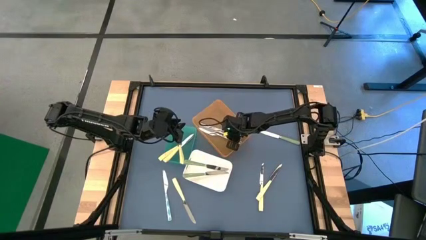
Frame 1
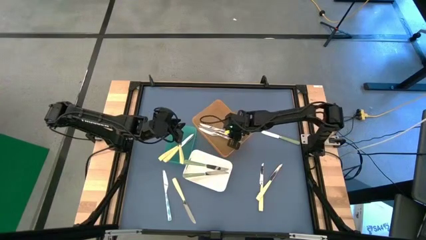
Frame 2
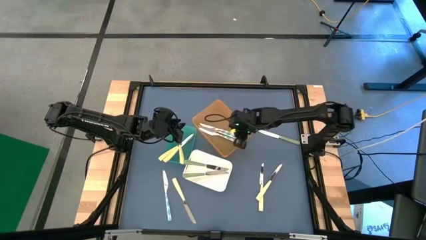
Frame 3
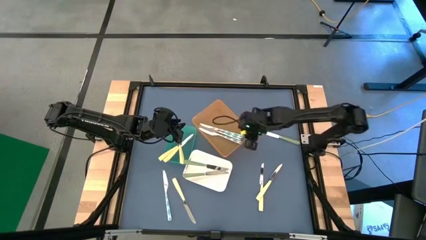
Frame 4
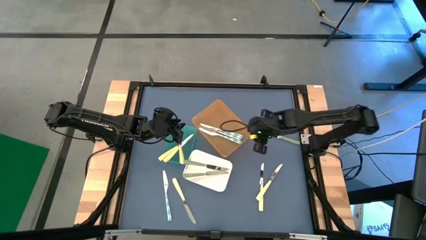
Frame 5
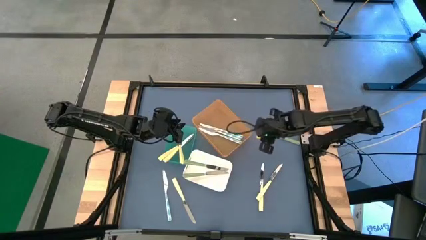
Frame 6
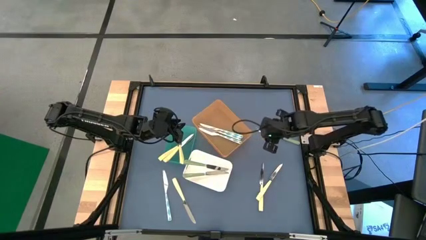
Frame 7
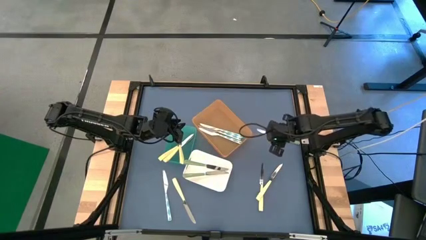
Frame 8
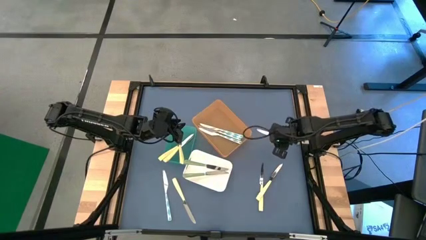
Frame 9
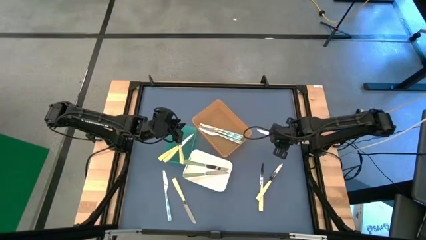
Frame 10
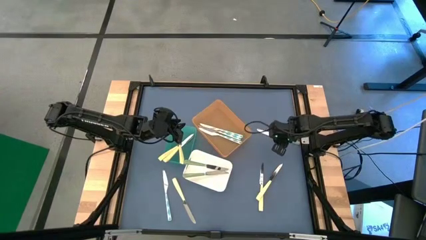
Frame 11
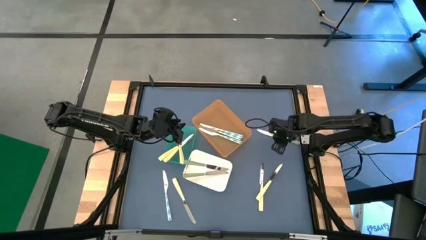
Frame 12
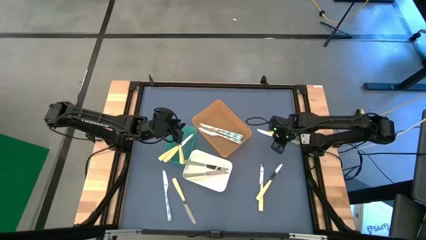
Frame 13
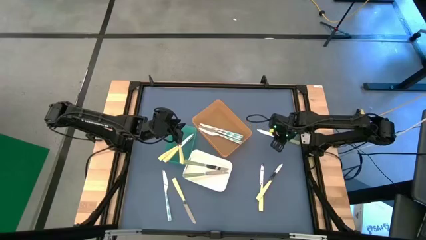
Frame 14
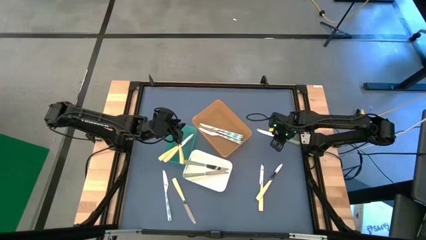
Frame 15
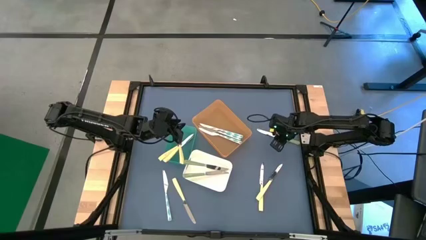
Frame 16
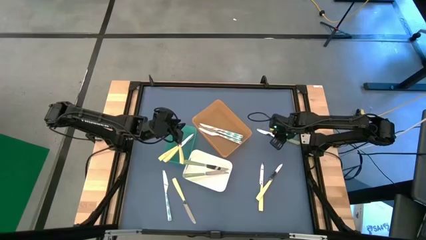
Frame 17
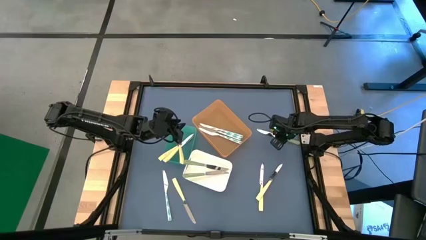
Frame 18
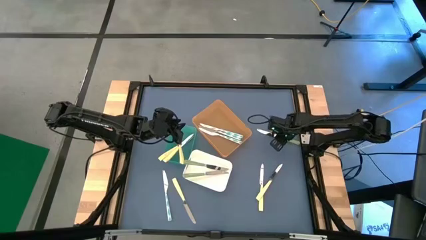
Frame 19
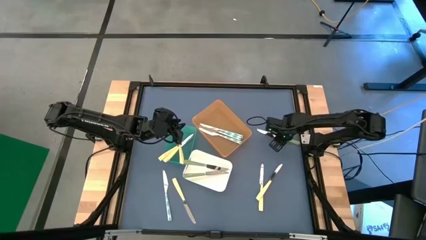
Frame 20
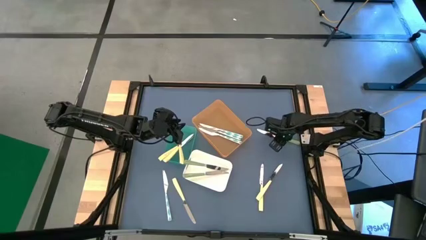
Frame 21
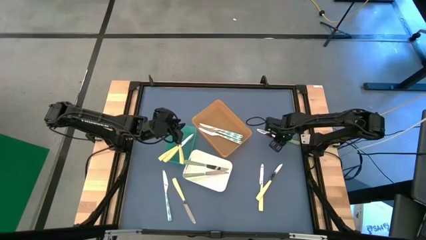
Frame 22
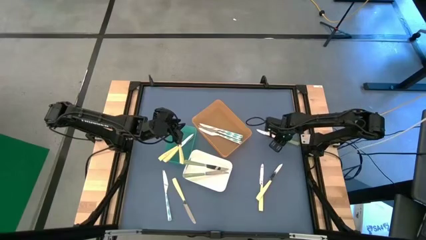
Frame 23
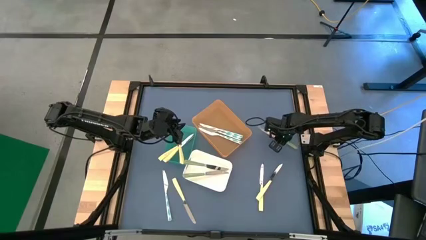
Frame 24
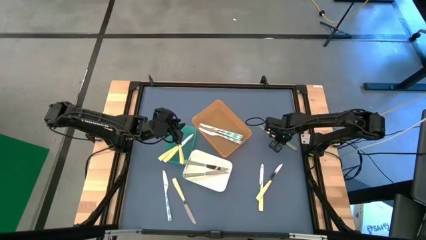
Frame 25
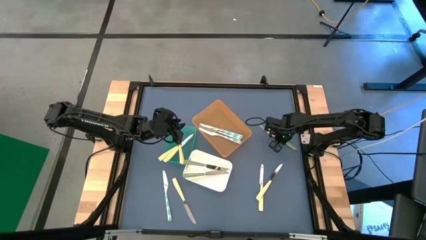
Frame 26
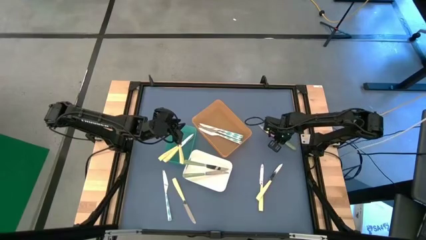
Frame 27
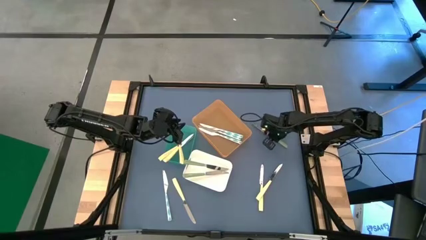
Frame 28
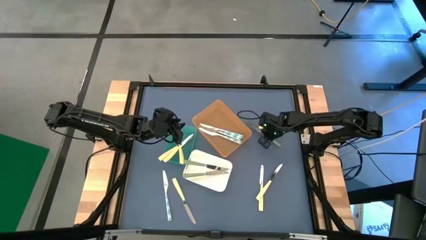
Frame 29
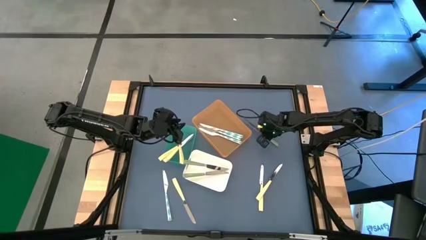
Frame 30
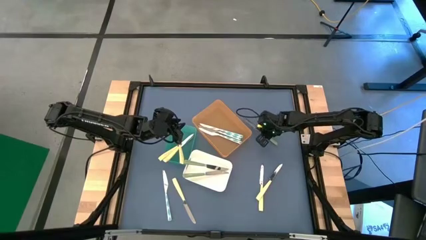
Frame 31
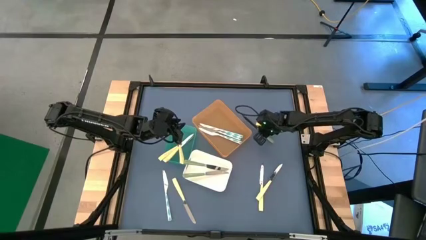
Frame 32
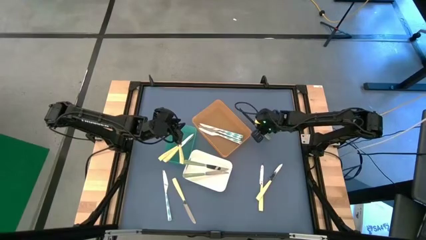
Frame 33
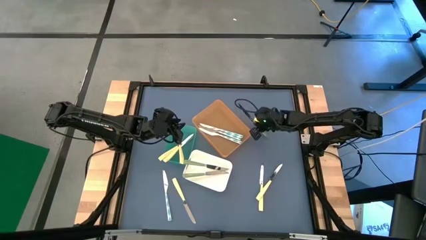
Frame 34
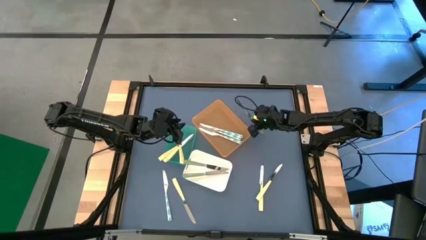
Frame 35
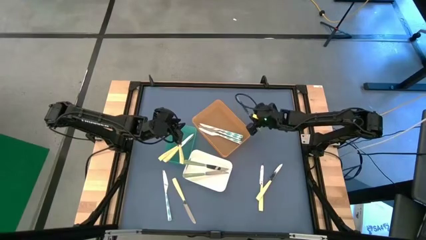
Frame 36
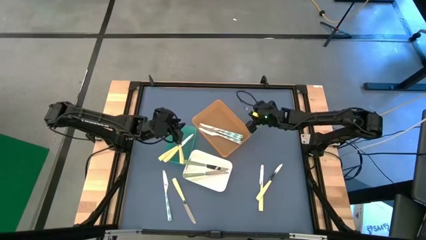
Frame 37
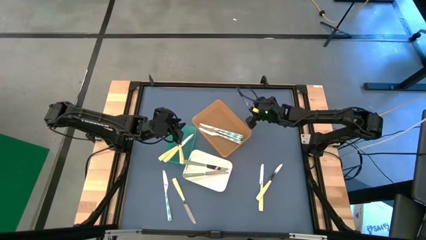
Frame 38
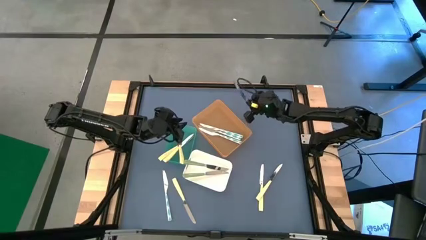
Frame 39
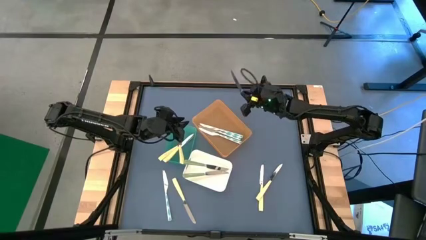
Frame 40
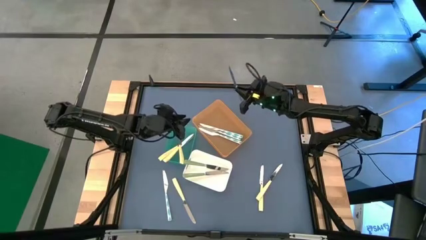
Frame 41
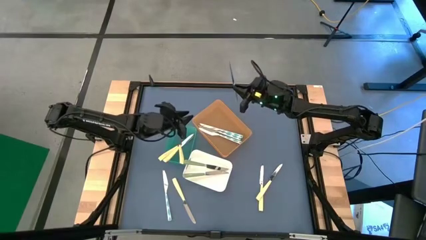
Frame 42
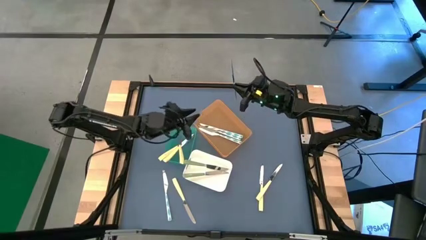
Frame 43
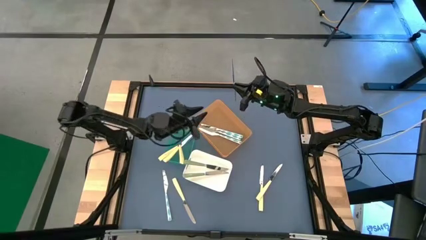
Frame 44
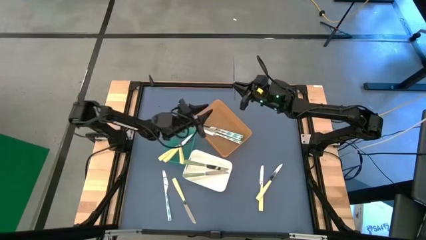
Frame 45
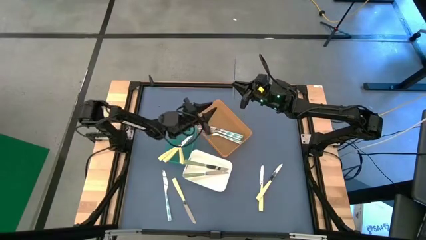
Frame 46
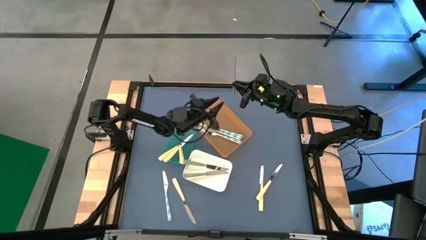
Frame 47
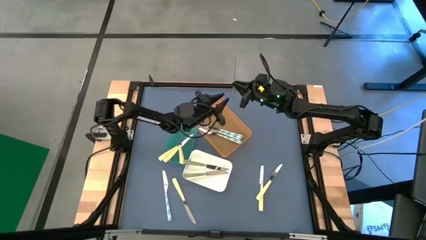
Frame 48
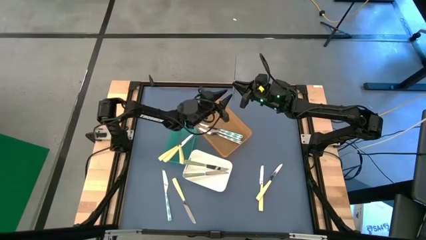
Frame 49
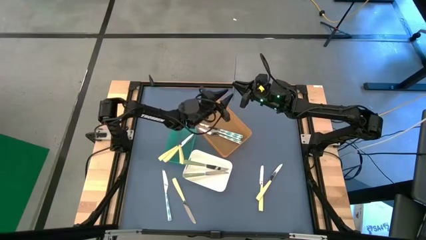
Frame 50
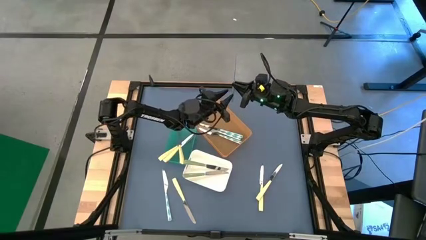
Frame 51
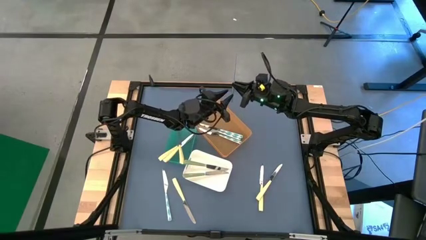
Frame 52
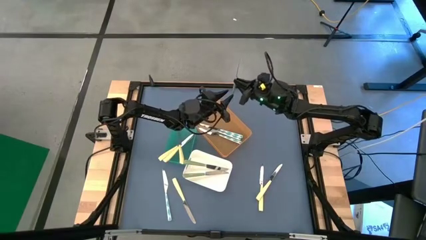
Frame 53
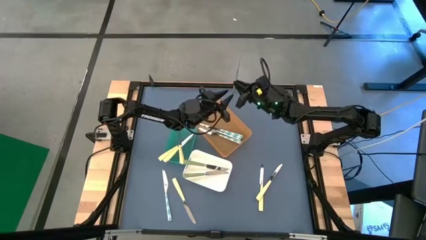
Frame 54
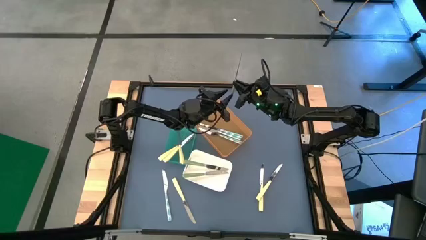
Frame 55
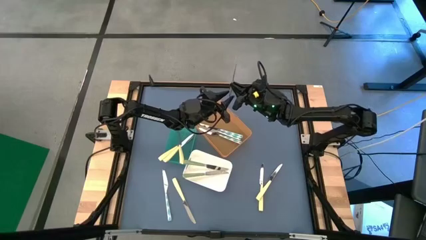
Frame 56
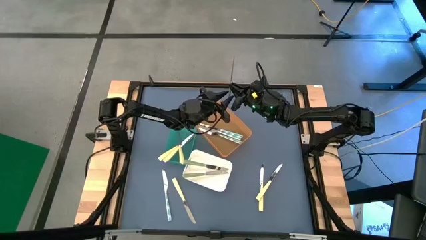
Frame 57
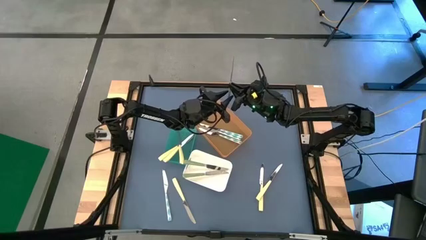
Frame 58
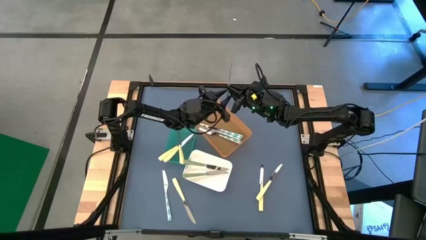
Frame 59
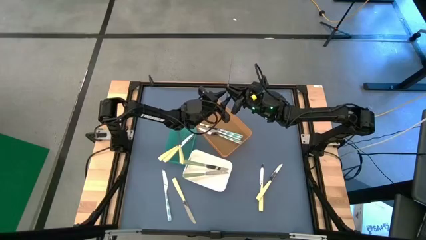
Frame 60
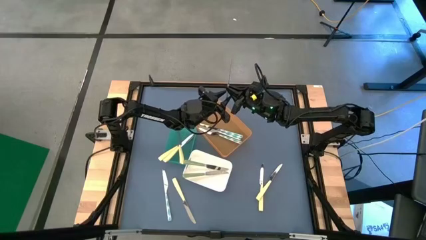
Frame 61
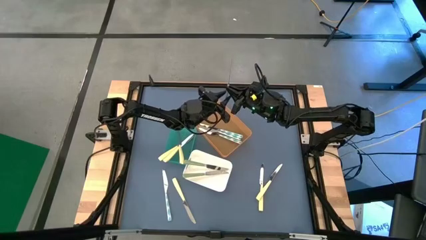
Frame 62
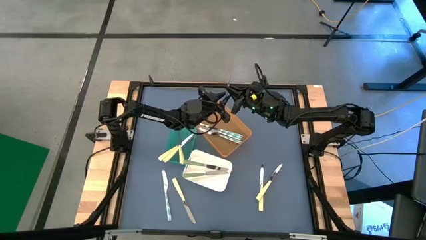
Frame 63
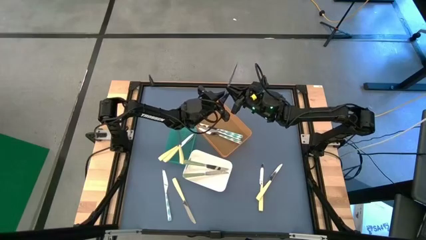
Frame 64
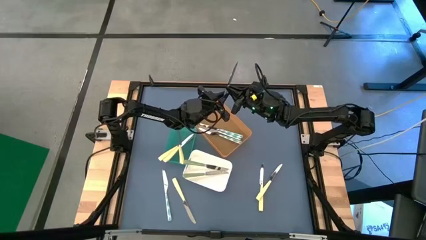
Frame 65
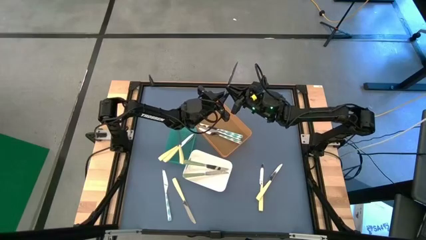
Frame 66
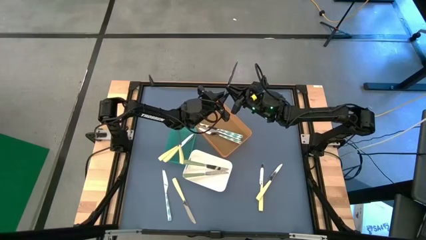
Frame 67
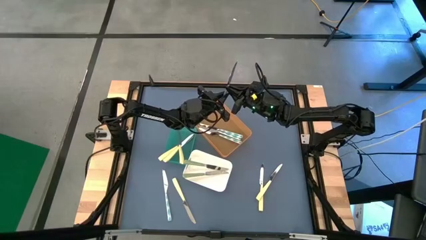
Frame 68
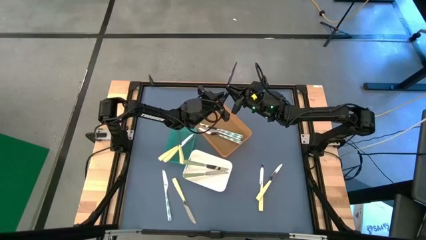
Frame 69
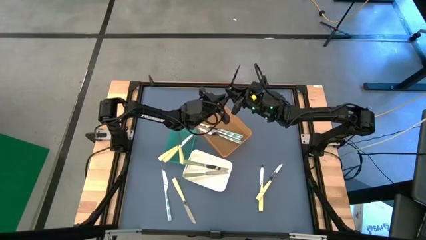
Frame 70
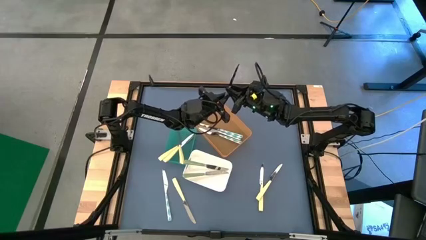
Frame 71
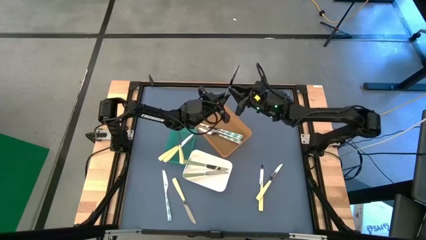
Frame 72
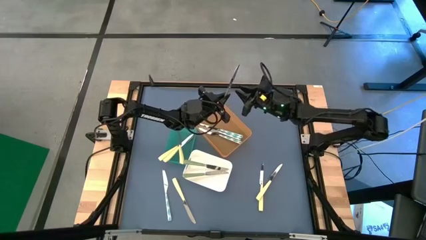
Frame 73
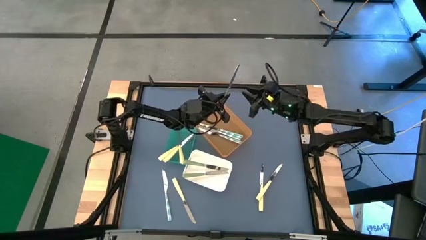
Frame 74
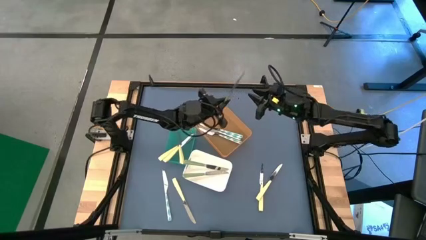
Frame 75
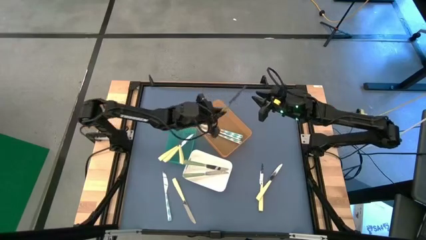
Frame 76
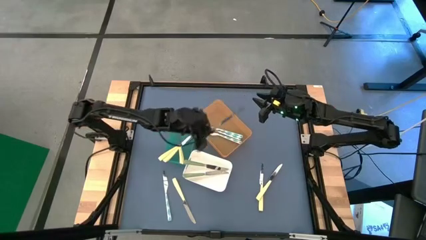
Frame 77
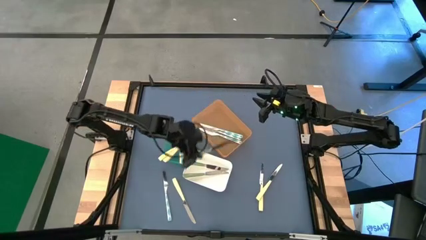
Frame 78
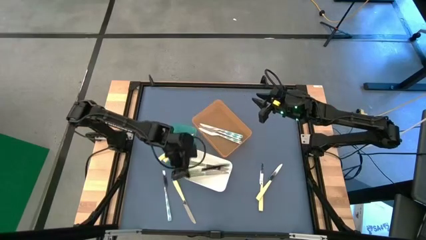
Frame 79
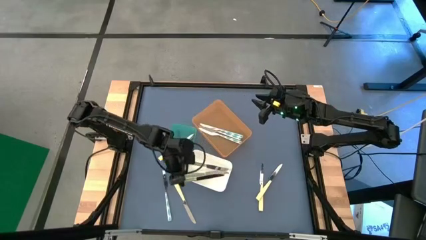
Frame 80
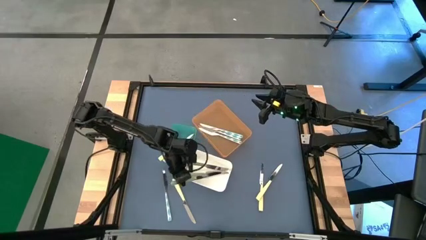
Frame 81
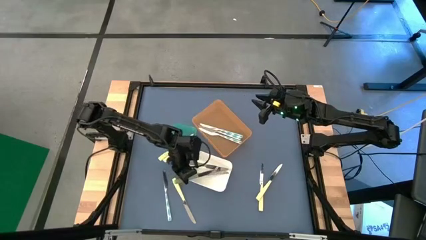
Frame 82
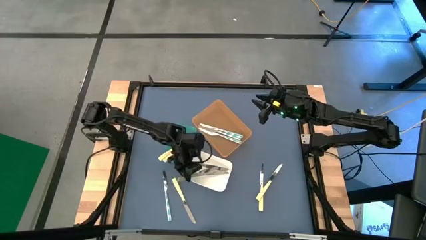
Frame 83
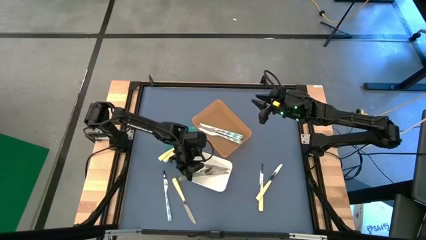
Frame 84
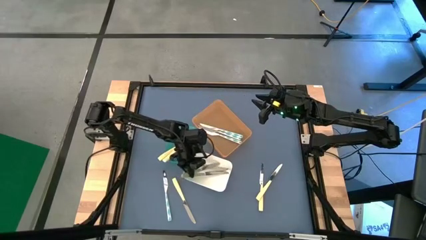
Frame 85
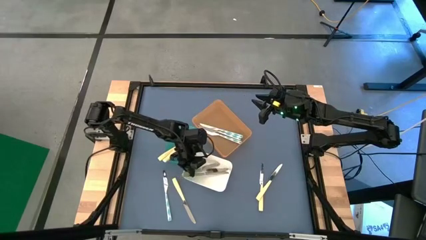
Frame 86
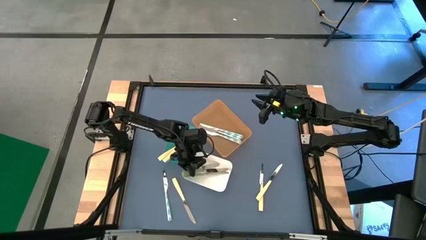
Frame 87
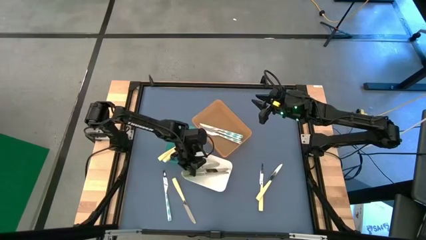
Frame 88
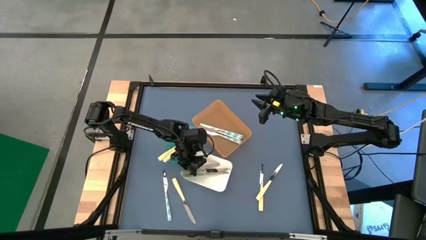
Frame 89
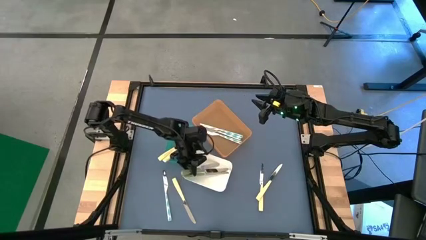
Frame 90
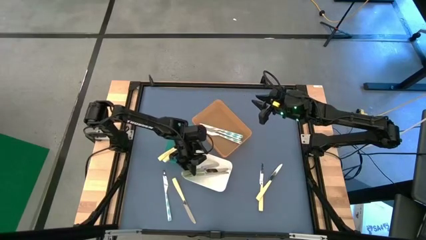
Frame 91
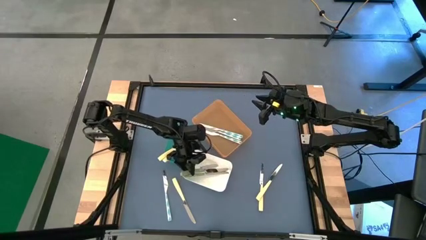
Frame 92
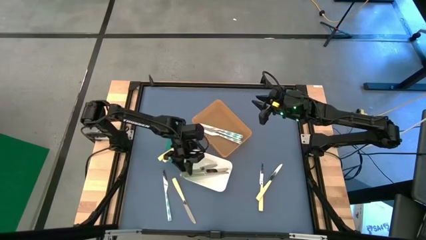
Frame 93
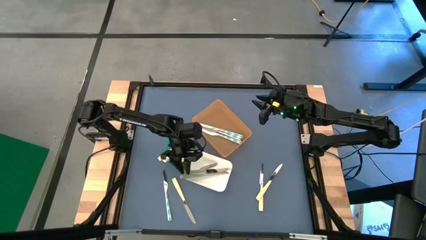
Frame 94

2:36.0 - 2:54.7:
Task: Sort silverware by color (type)
Put the green table knife into the white bin
